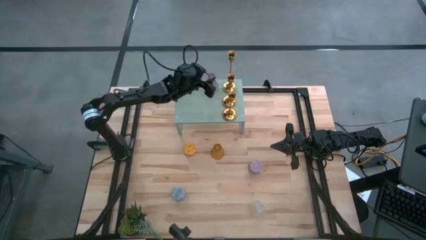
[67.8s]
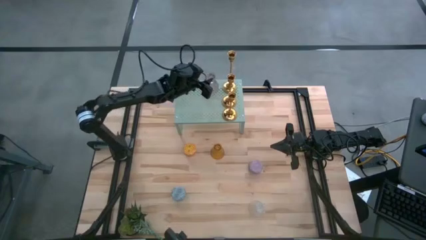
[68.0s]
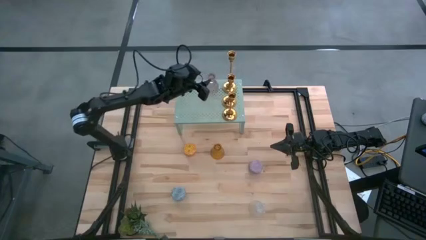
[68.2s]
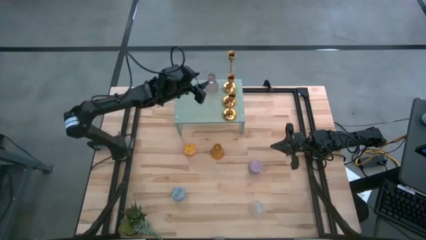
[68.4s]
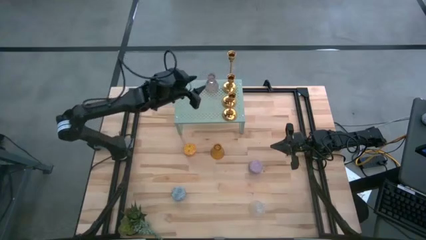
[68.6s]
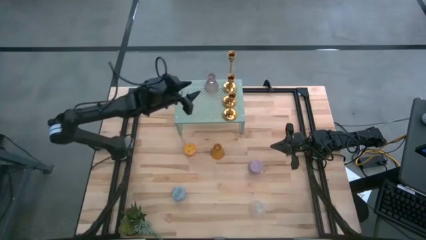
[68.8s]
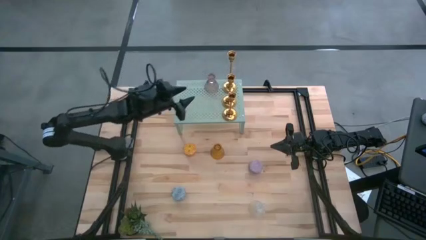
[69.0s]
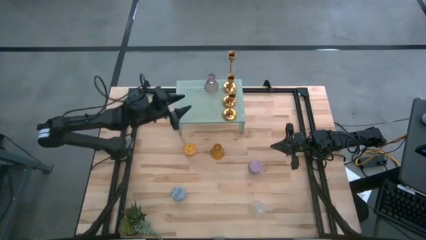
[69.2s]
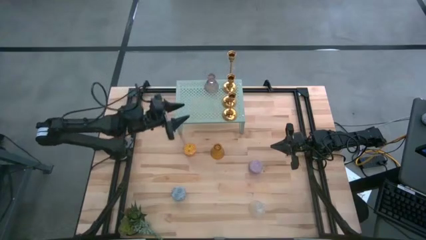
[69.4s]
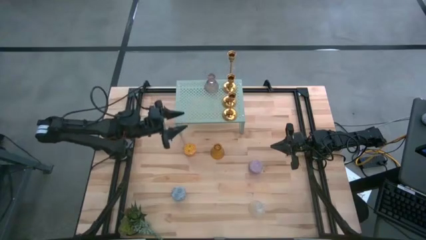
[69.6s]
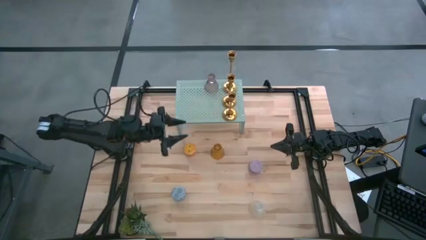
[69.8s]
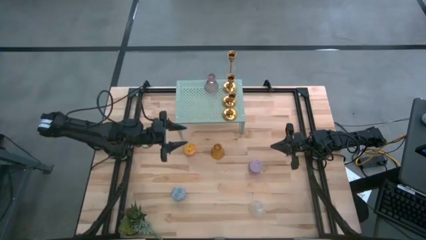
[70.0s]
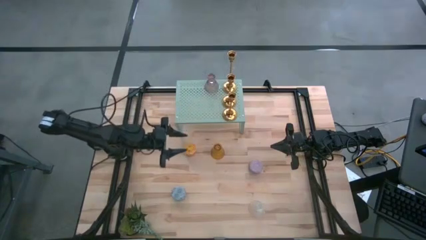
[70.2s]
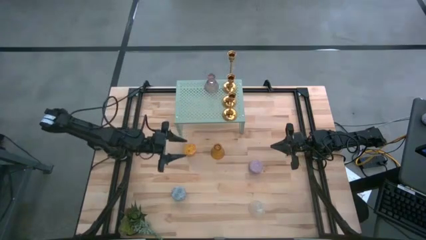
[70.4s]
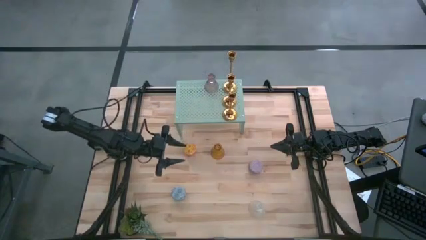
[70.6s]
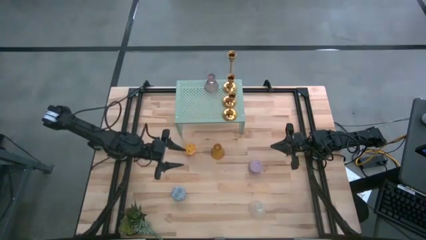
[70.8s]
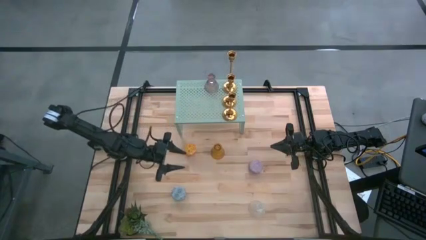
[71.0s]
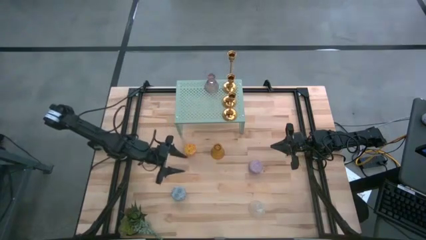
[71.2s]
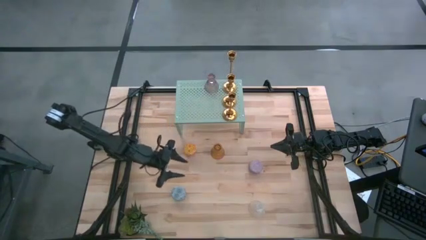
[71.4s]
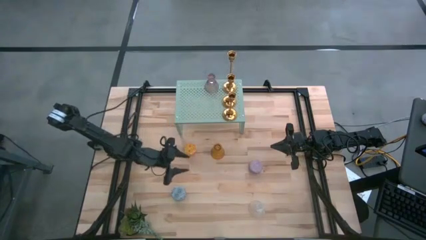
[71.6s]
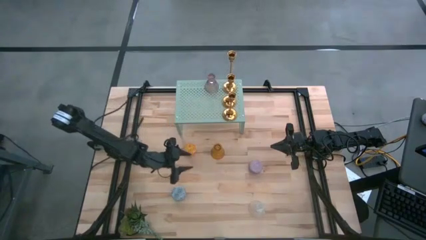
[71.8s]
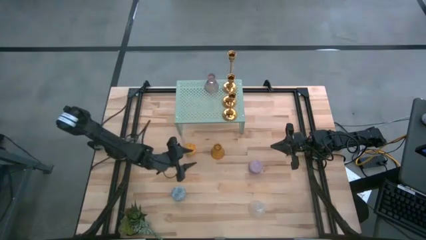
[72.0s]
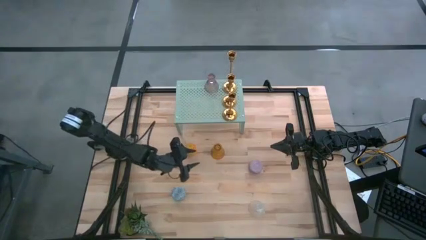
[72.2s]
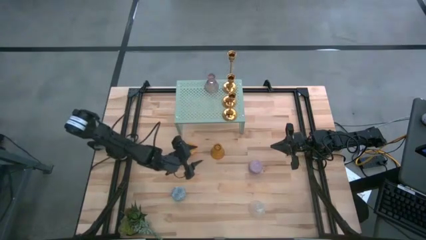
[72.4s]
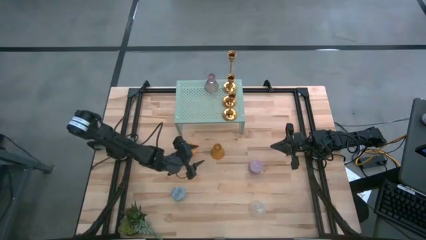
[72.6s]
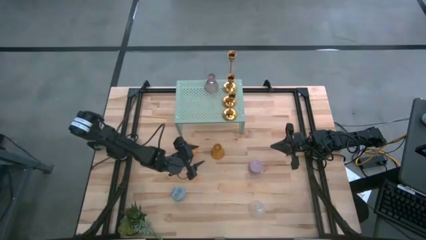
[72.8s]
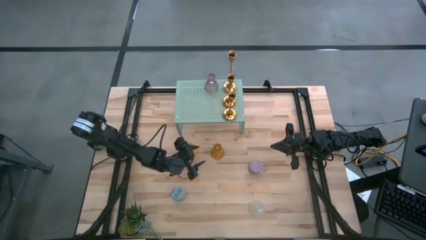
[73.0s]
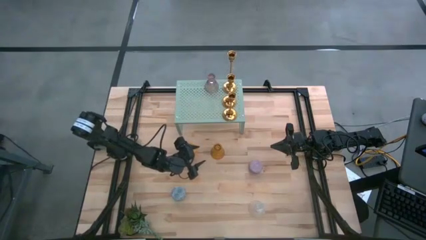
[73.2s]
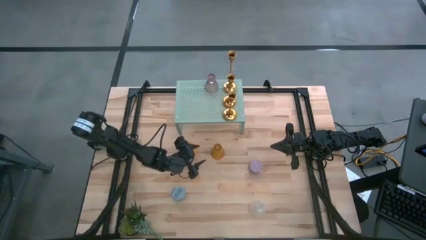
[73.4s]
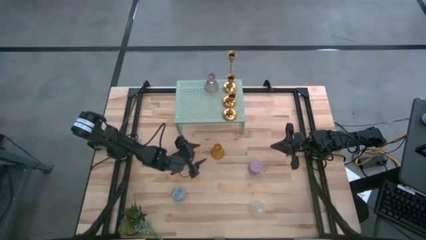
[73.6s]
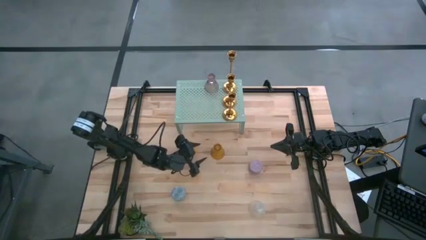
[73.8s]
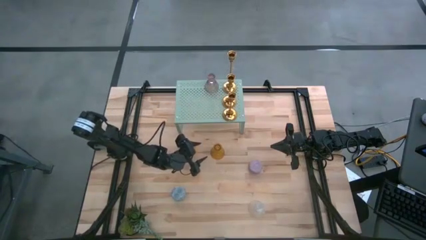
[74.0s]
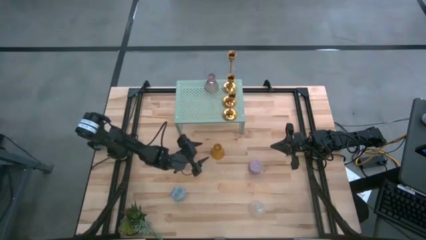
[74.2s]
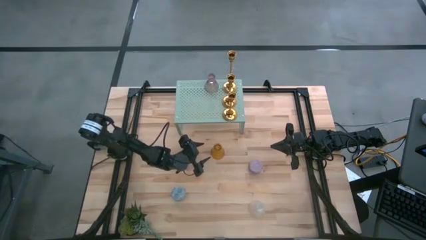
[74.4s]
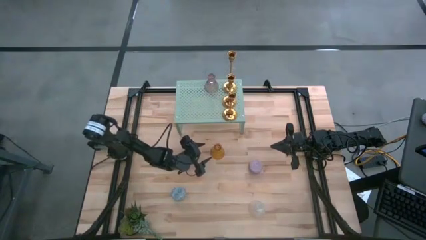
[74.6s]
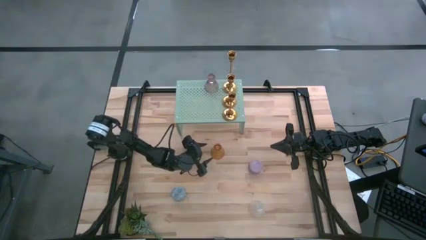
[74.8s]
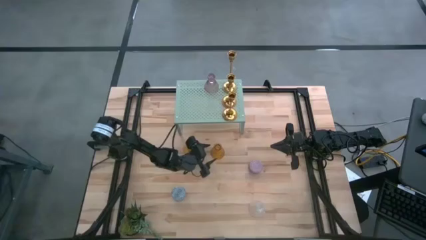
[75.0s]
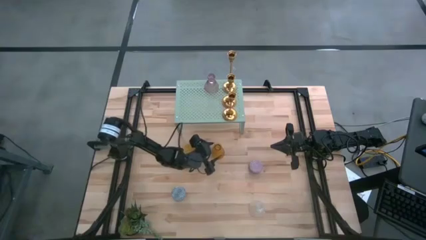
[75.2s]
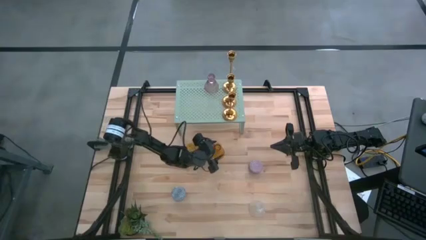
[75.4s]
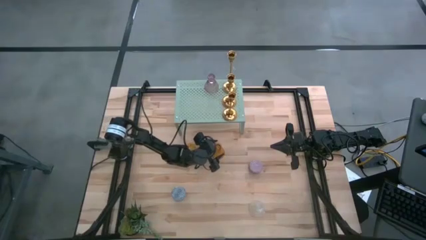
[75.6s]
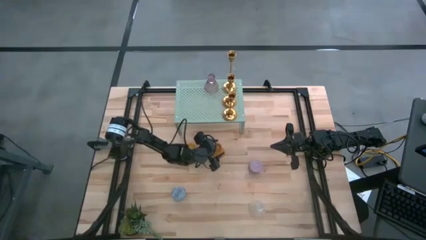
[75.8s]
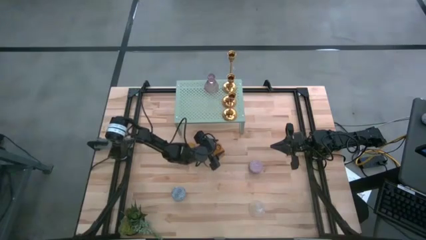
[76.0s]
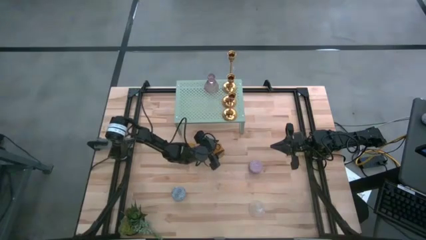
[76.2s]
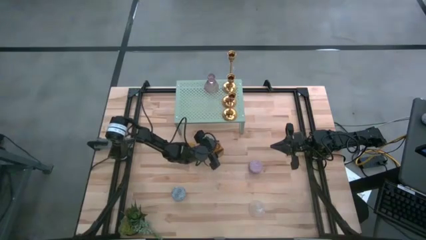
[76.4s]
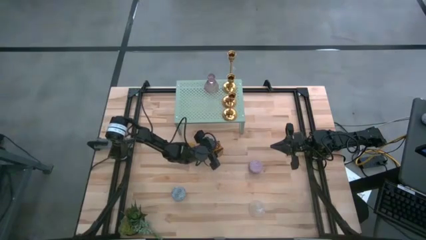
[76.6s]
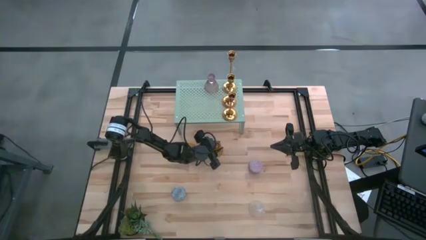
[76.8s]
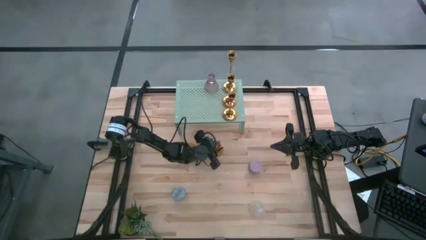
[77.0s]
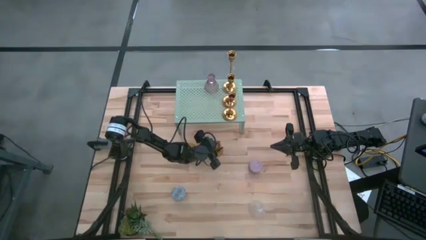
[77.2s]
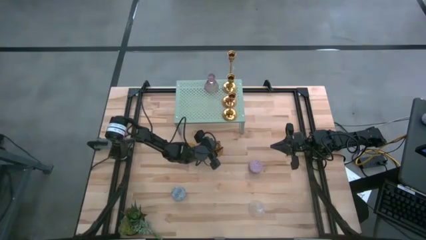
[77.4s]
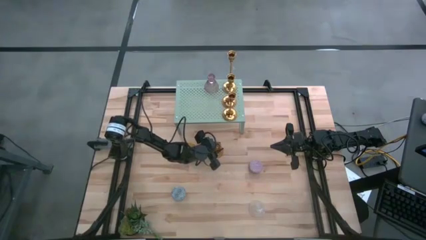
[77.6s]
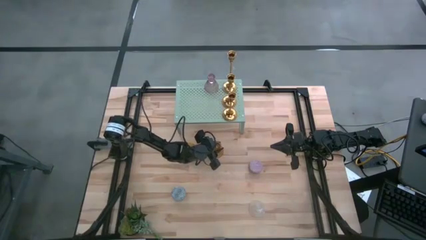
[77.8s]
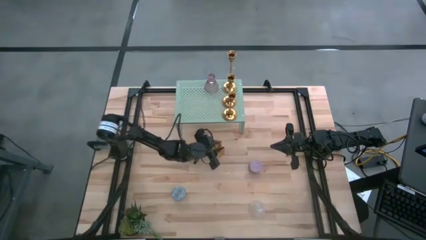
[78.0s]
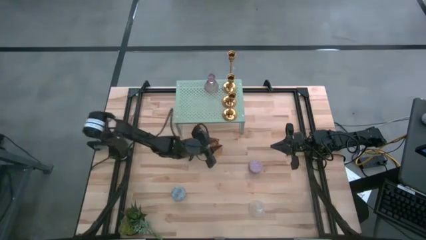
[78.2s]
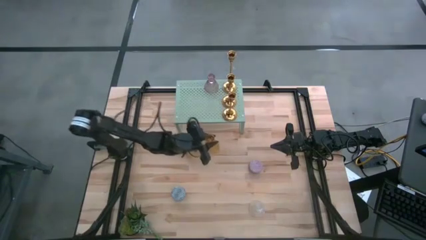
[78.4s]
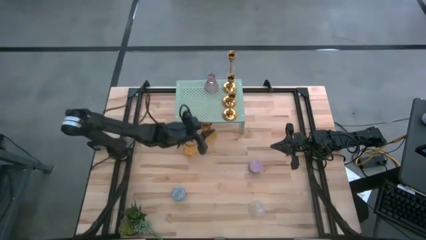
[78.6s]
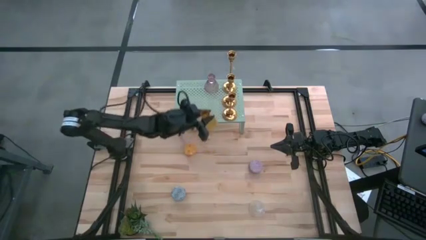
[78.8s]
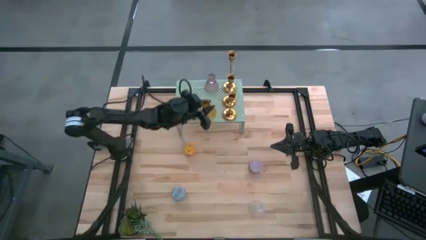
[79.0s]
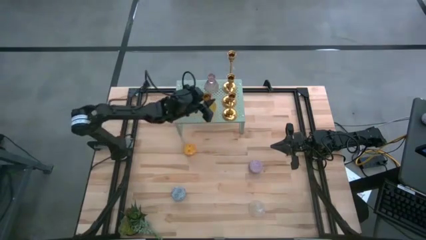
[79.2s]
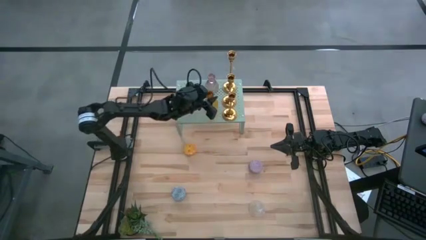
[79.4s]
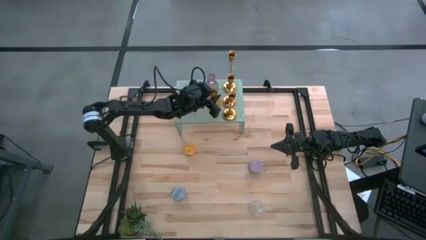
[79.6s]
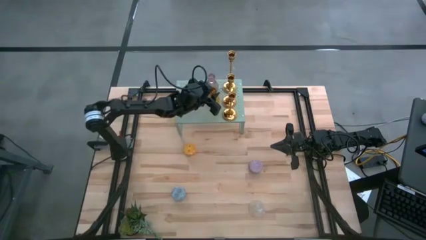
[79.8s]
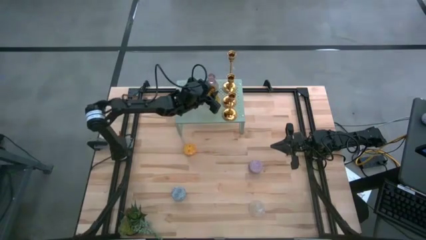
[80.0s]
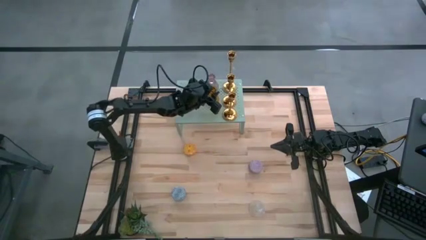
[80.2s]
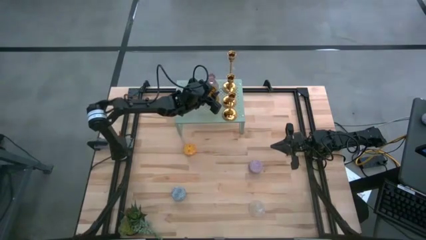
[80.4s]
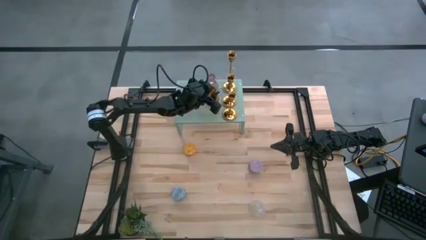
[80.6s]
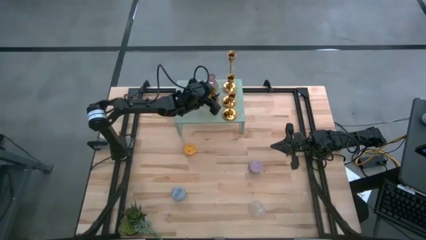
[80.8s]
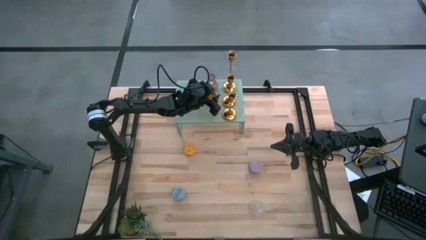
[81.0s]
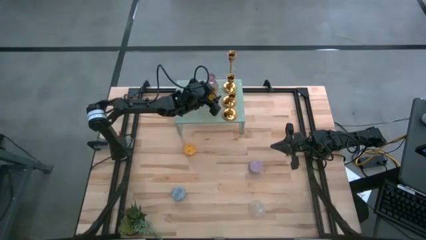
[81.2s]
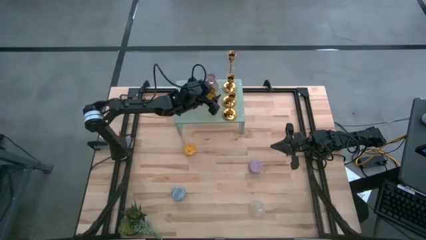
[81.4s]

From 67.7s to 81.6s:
Task: Pick & Place candle stick holders
Put the yellow glass candle holder on the shelf aligned with the pink glass candle holder
